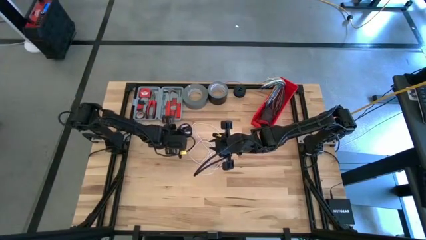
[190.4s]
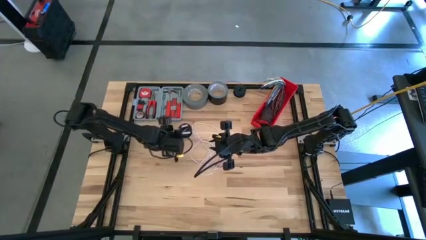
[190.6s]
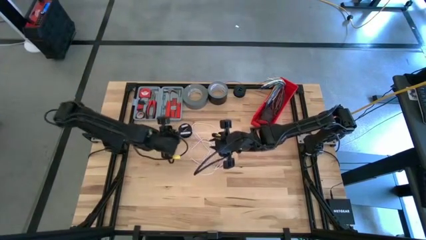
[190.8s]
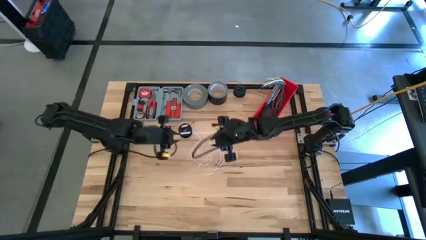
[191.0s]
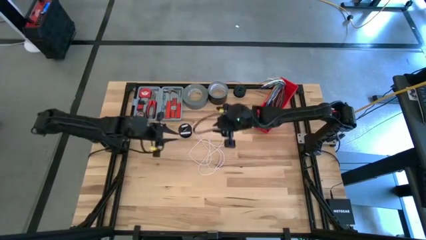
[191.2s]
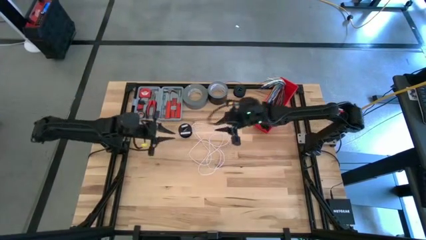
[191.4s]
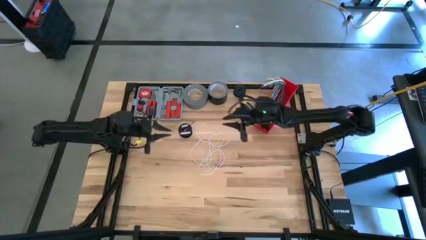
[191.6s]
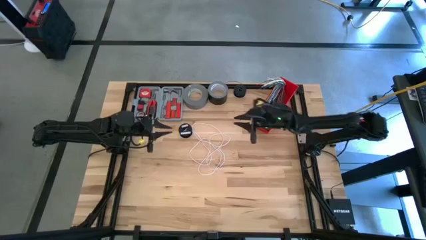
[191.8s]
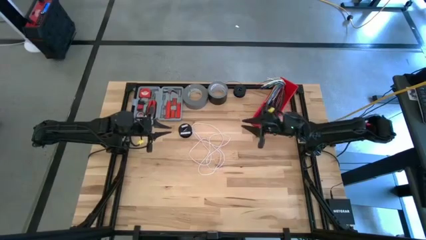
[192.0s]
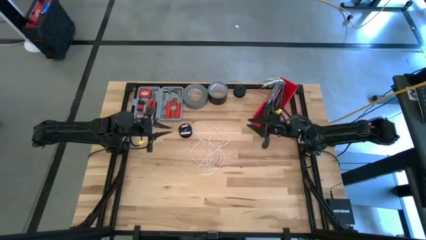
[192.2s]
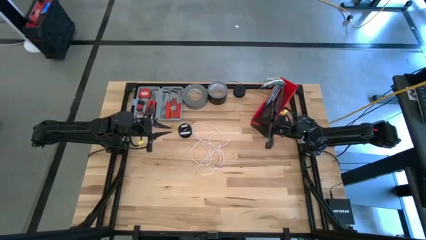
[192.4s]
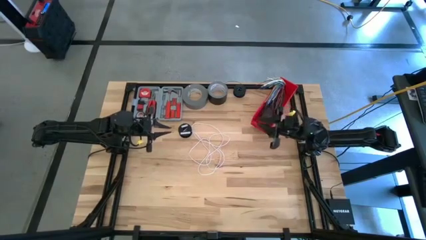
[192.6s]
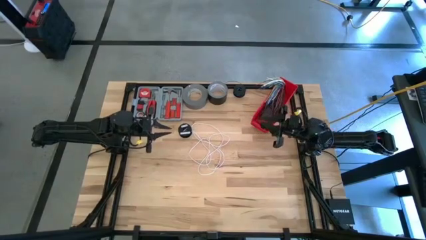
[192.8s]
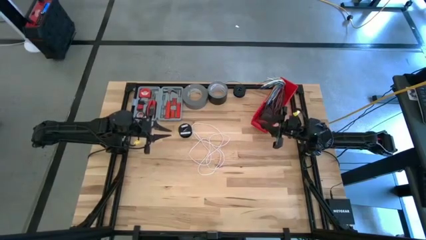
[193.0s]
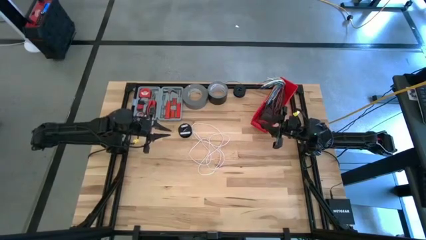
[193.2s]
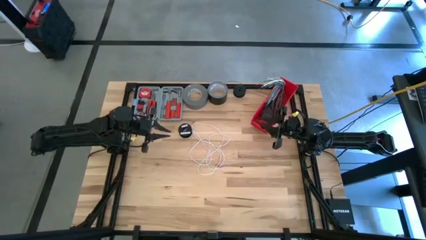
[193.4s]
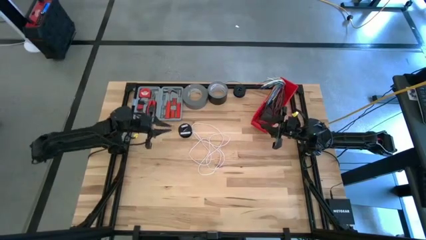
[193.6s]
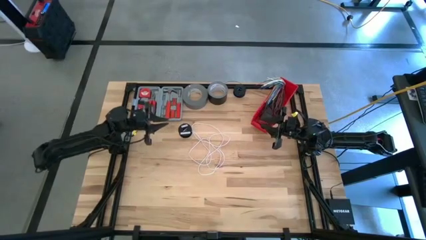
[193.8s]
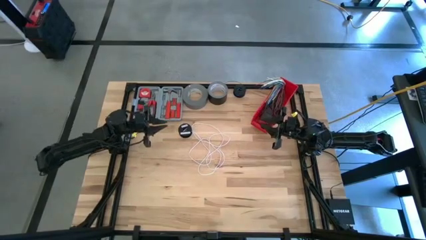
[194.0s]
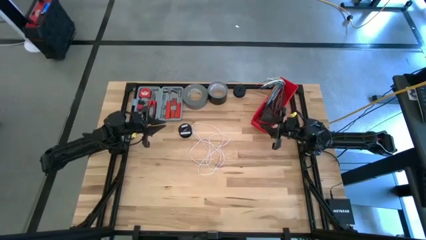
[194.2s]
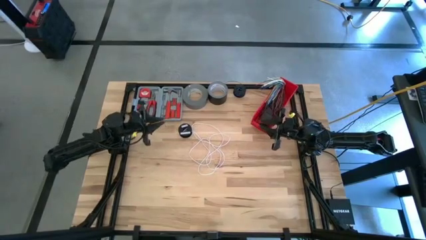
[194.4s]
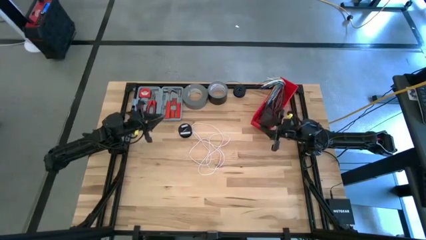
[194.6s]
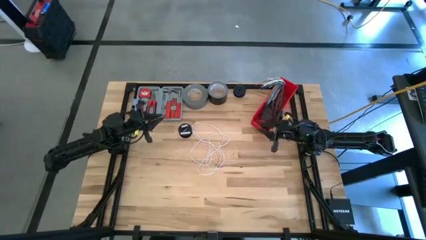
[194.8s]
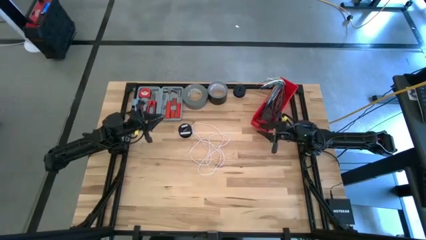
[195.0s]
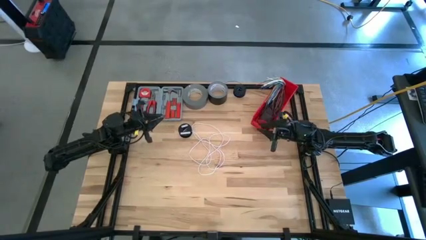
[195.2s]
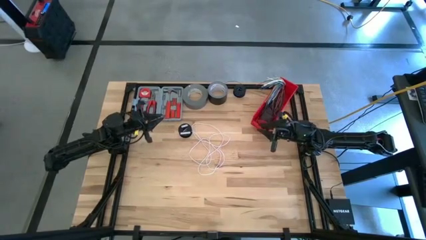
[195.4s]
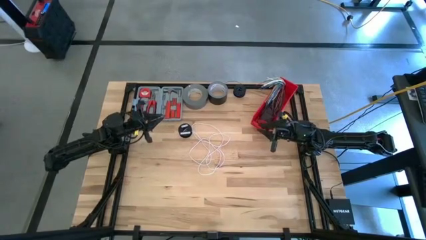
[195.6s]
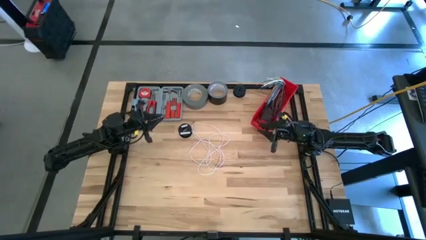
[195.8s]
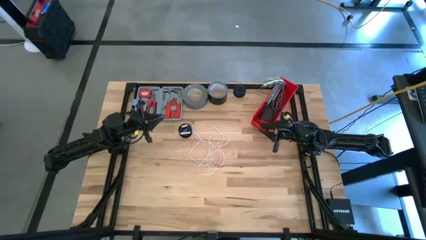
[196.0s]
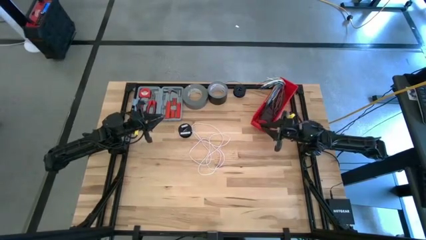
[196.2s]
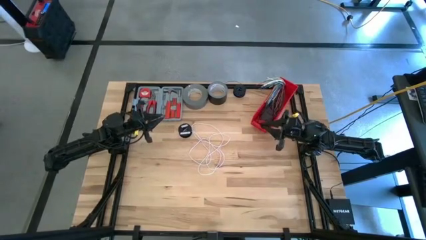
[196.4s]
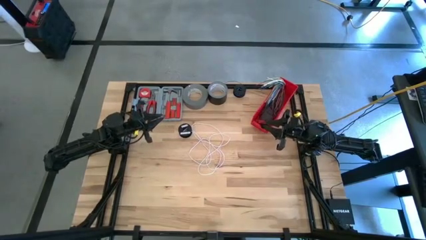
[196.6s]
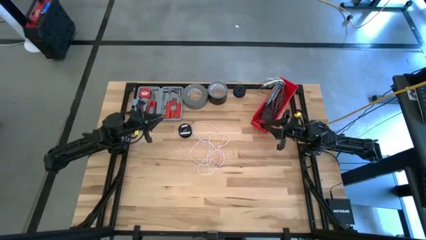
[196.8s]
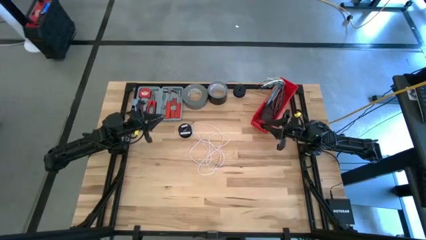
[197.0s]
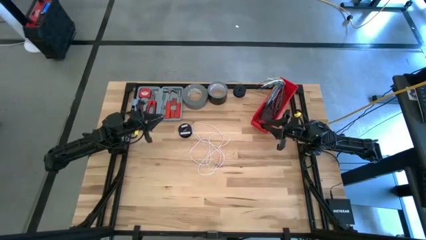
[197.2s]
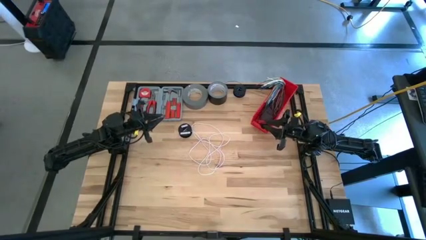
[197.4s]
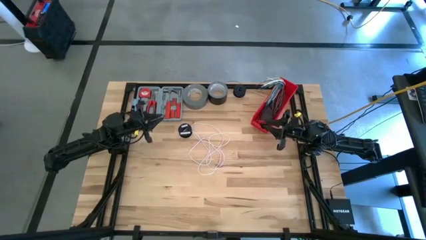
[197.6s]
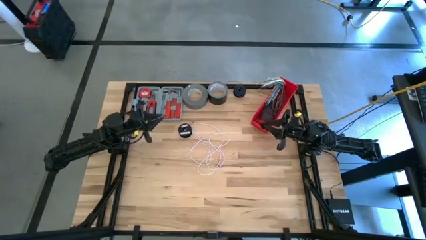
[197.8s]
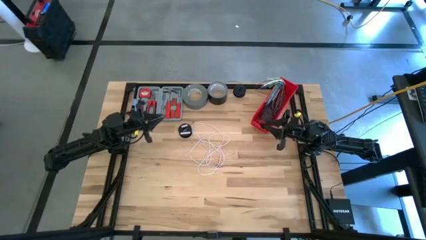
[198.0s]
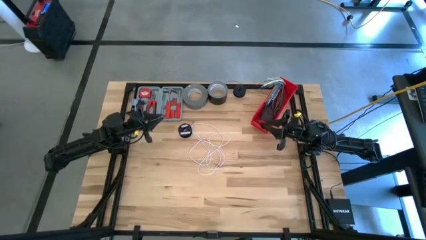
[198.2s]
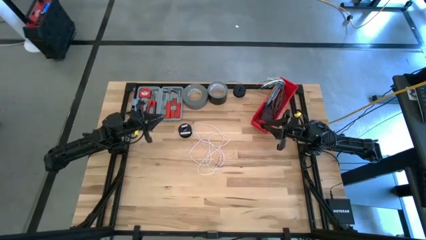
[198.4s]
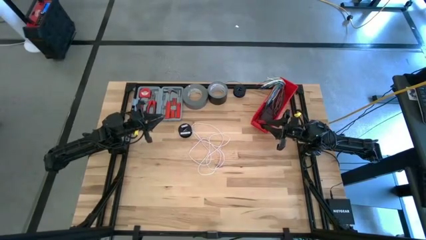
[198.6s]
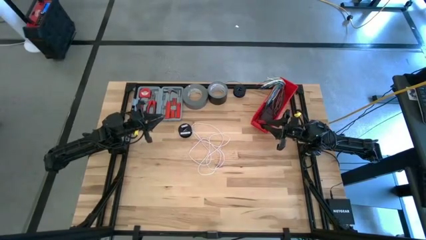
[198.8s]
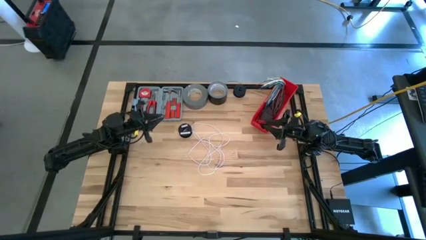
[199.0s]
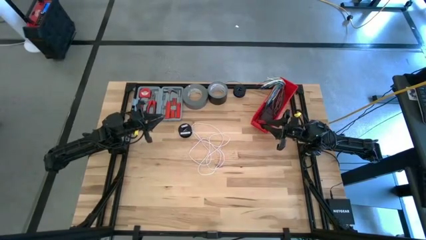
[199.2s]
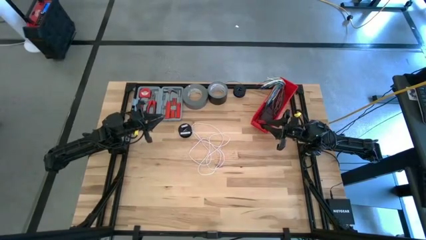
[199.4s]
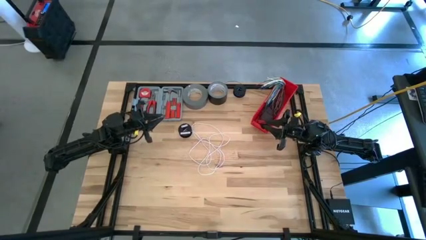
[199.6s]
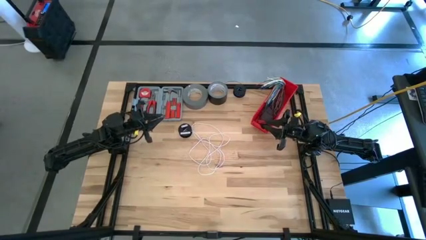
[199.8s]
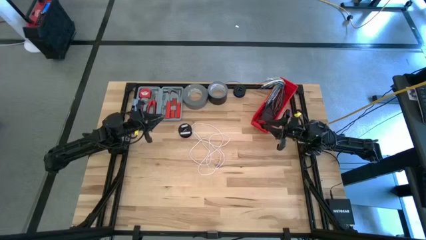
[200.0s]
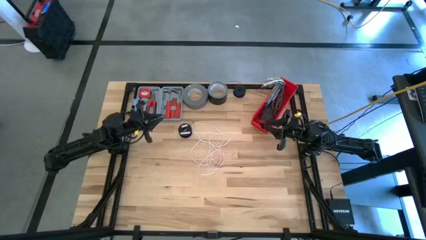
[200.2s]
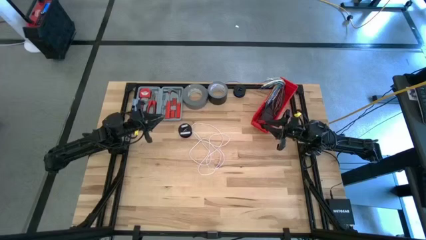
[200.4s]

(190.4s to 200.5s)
Task: Coil cords
Return to Home Position

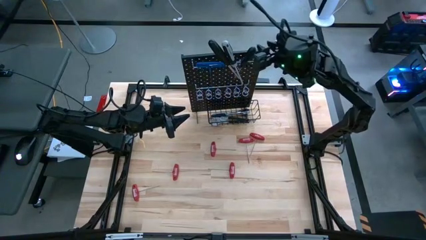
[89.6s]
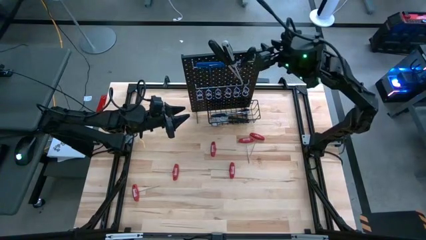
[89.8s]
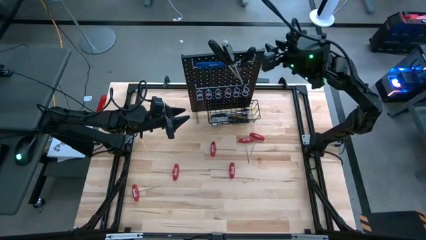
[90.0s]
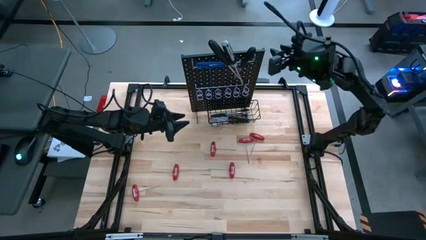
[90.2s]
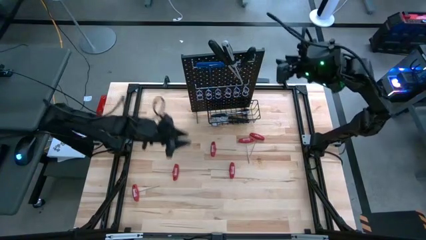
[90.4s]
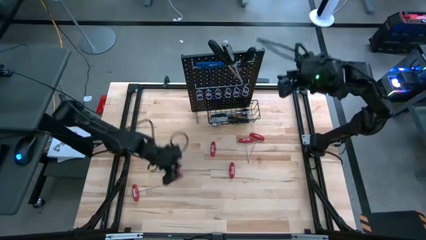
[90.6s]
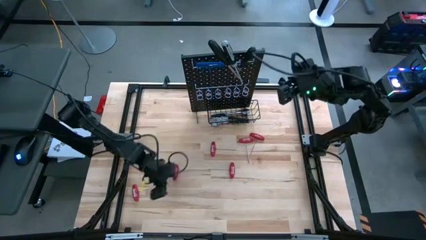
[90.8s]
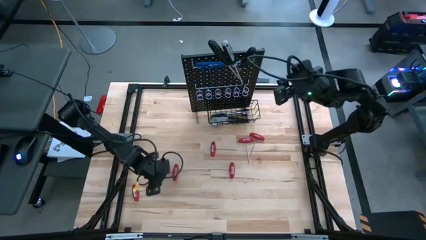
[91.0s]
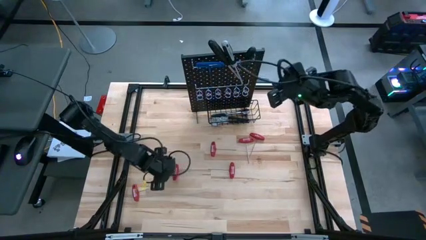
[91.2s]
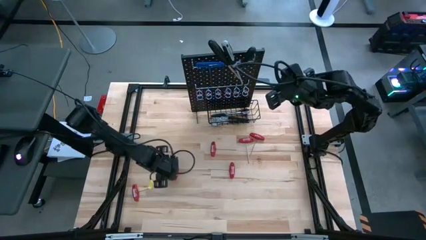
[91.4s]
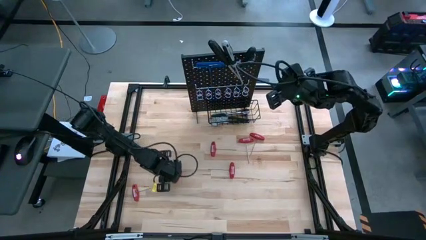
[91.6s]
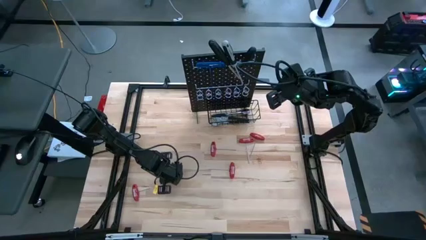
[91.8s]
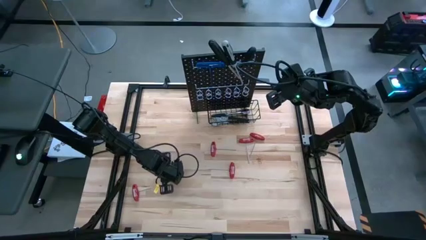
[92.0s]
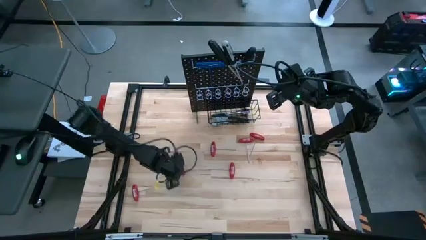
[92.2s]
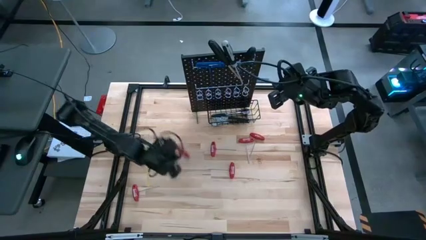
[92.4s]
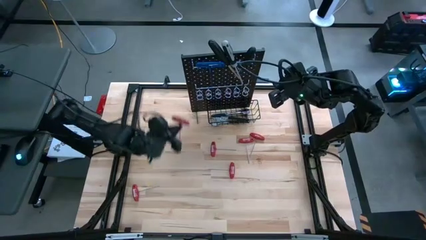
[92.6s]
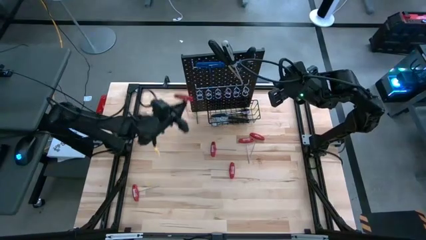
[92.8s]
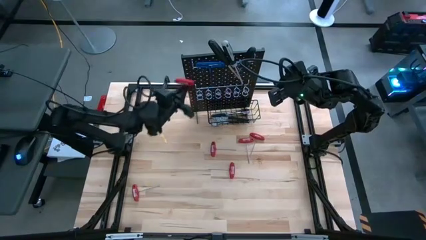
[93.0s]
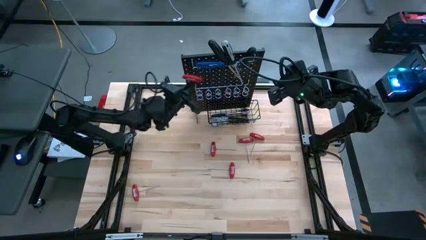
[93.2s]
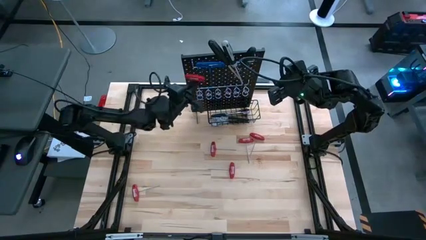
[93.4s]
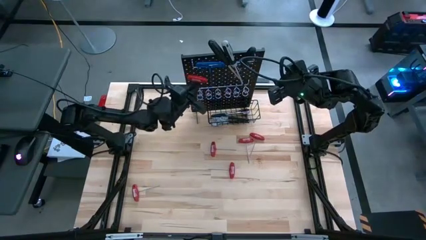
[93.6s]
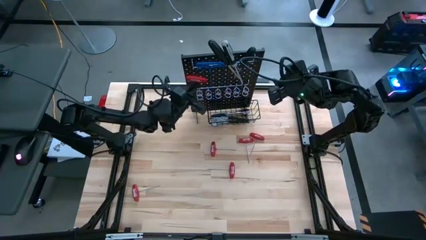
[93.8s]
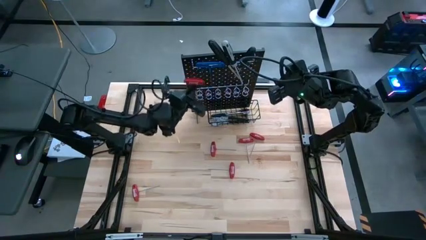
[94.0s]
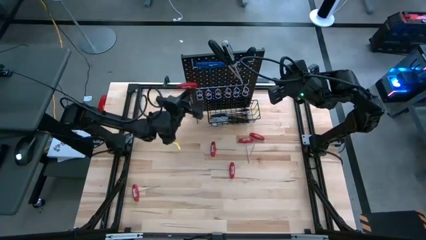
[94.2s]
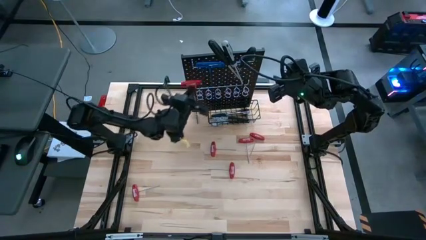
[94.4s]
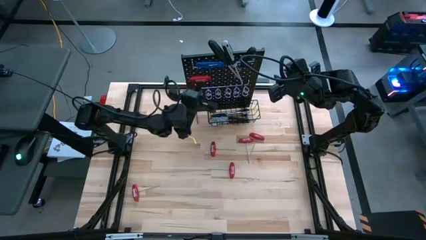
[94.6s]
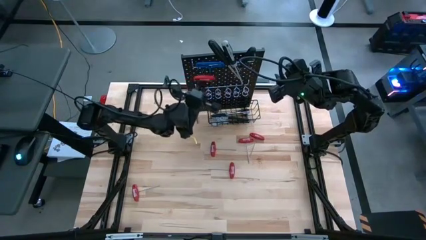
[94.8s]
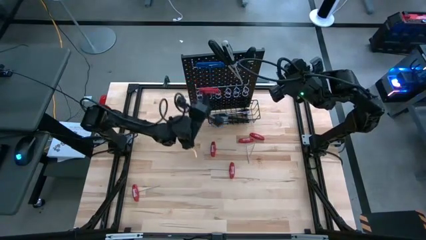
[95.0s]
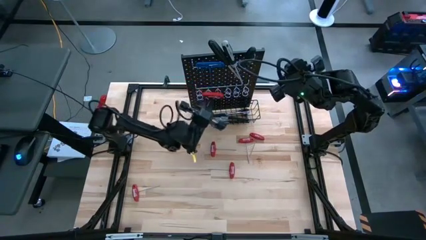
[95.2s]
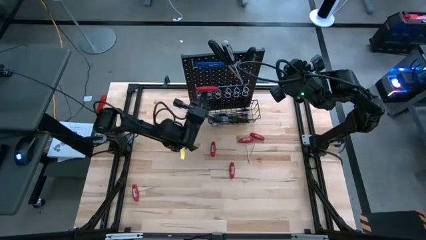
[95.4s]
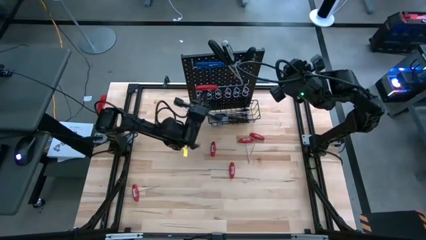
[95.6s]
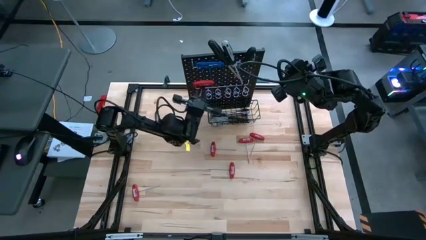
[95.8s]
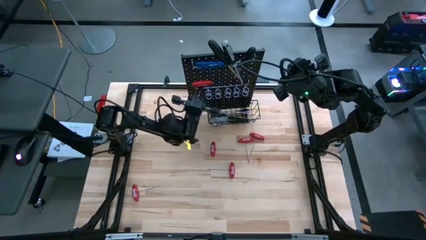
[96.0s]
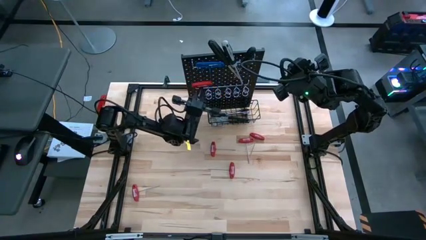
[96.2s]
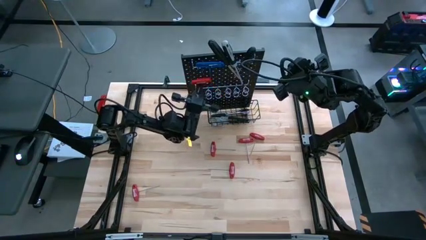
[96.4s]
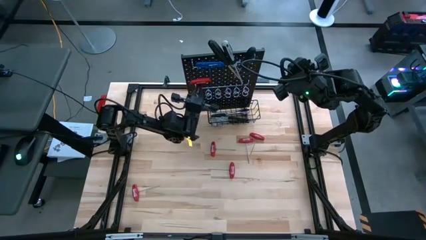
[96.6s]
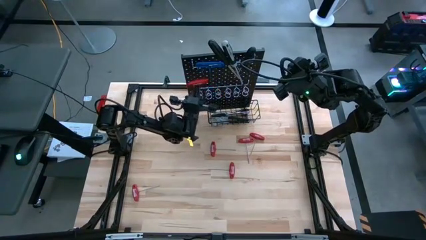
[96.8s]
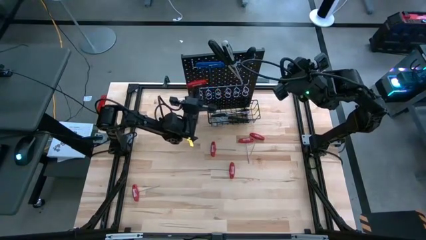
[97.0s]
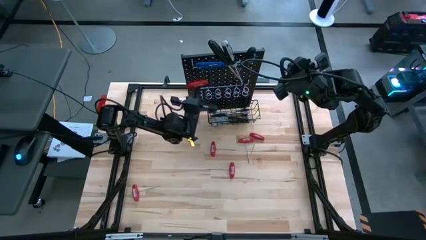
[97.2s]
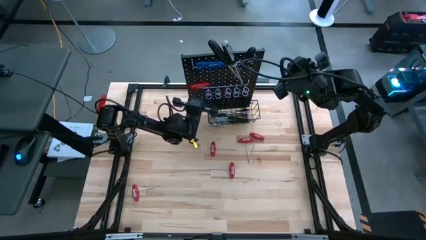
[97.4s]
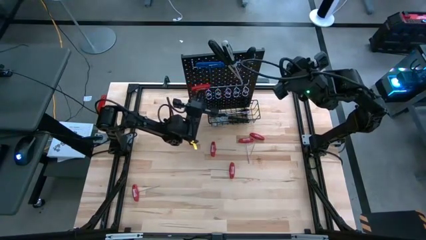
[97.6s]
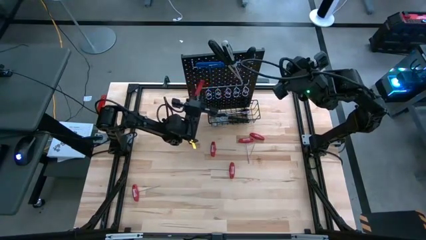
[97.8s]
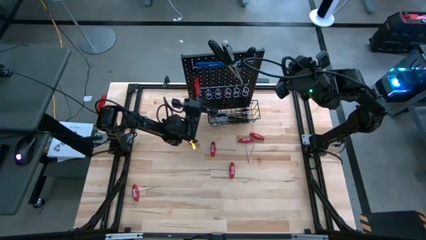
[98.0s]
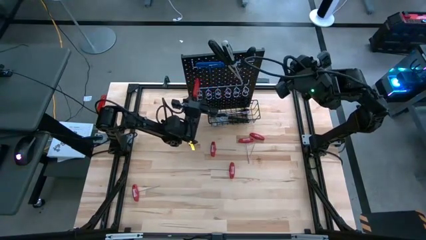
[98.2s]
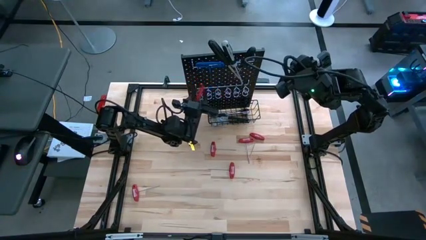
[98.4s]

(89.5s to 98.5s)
Task: Hang tools onto peg board
Hang the red allen wrench on the pegboard
